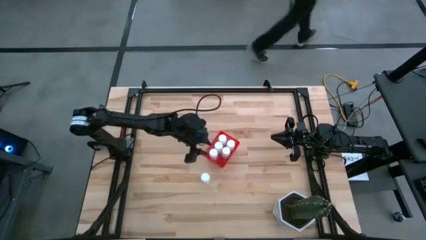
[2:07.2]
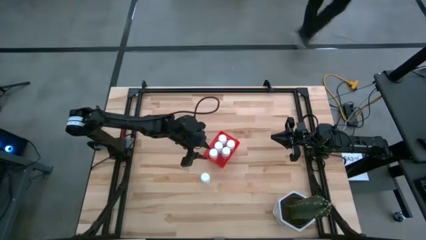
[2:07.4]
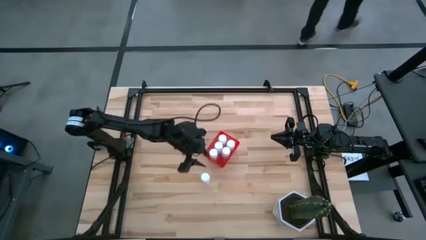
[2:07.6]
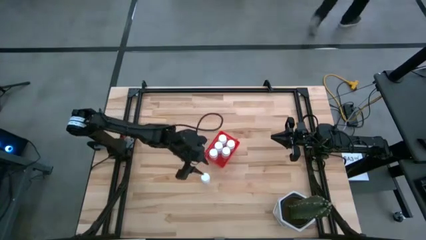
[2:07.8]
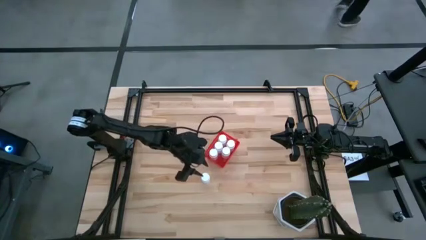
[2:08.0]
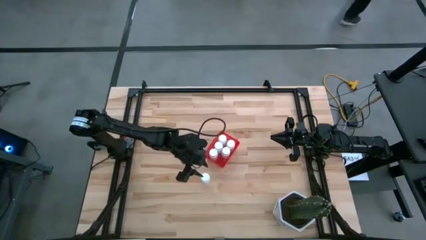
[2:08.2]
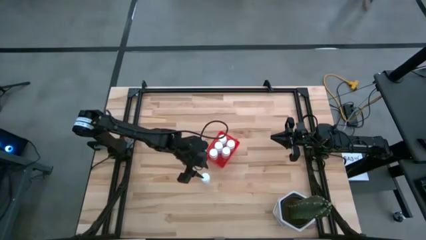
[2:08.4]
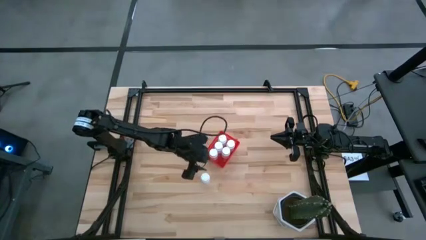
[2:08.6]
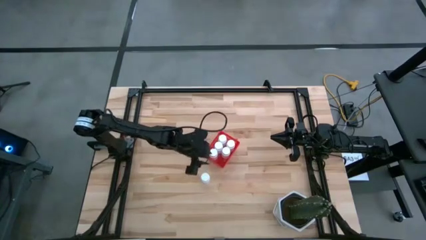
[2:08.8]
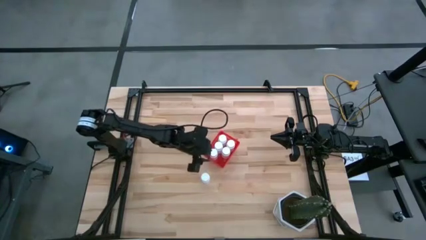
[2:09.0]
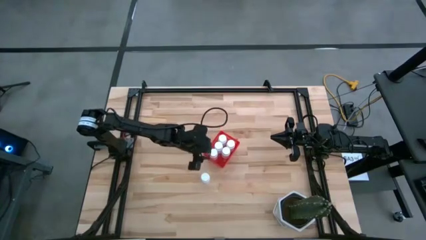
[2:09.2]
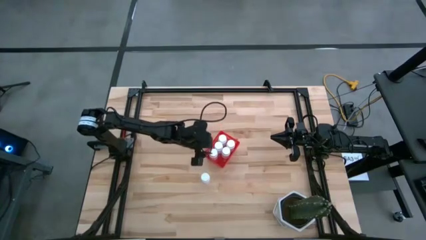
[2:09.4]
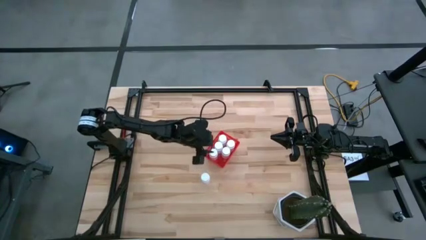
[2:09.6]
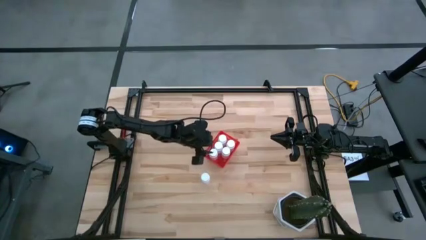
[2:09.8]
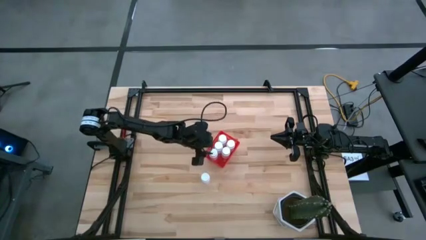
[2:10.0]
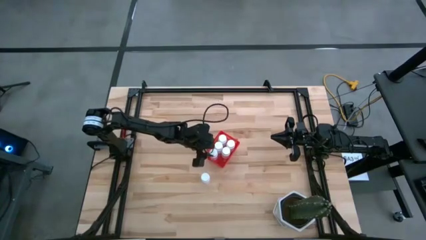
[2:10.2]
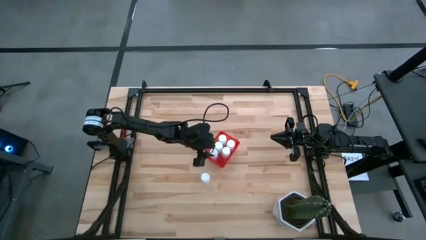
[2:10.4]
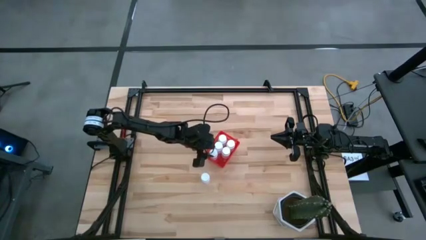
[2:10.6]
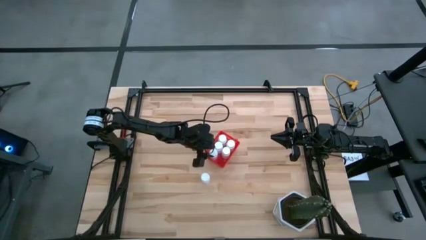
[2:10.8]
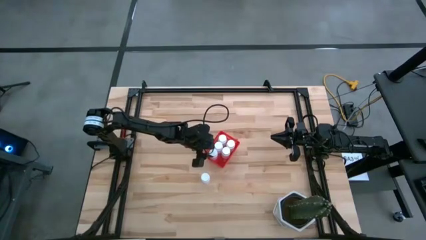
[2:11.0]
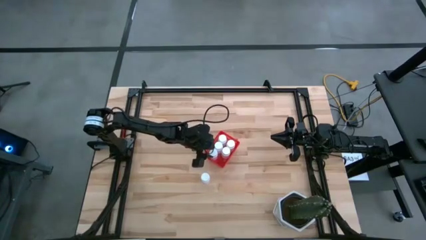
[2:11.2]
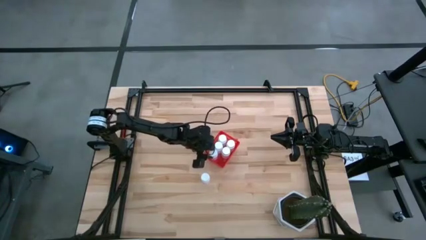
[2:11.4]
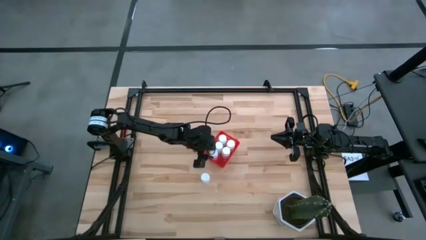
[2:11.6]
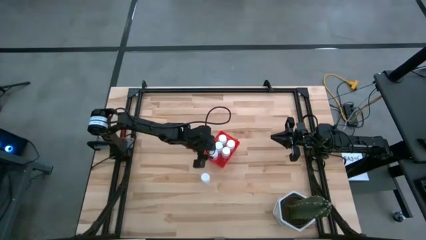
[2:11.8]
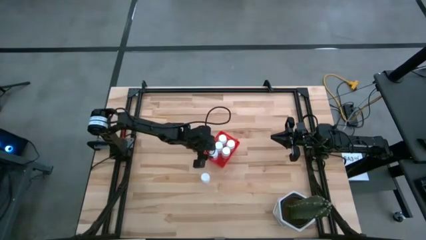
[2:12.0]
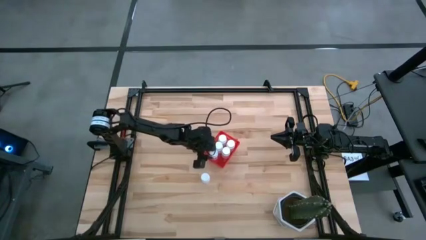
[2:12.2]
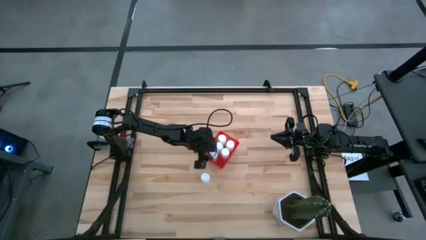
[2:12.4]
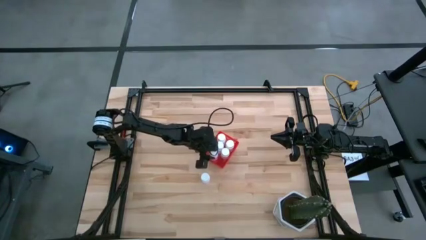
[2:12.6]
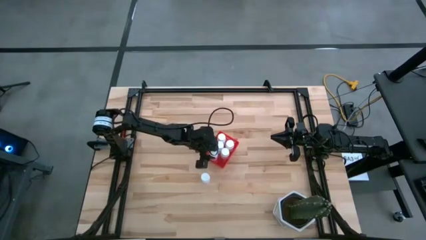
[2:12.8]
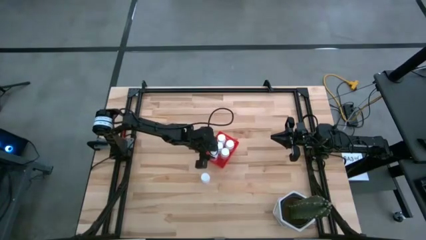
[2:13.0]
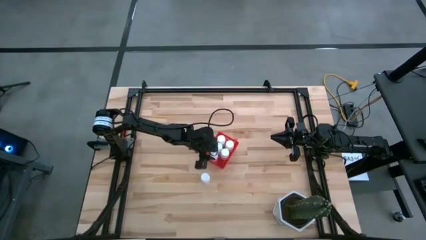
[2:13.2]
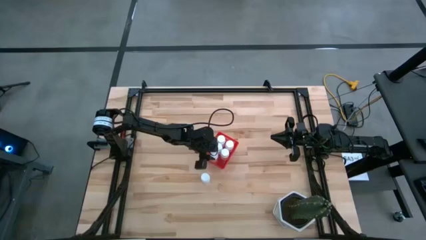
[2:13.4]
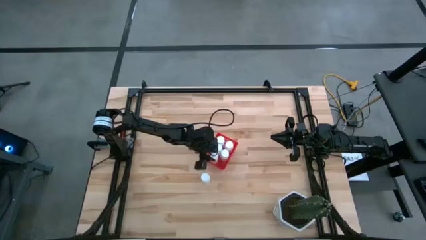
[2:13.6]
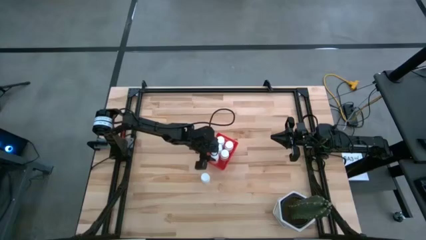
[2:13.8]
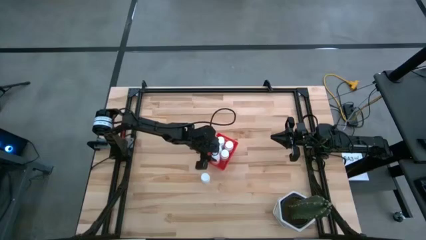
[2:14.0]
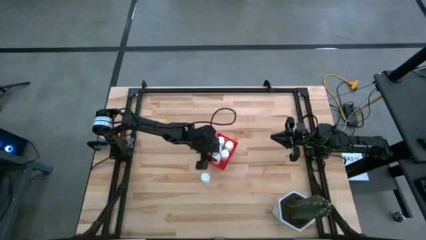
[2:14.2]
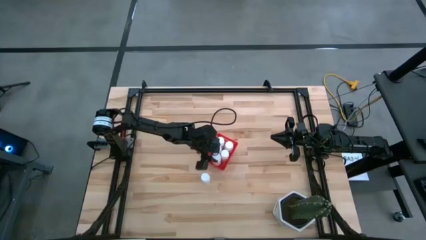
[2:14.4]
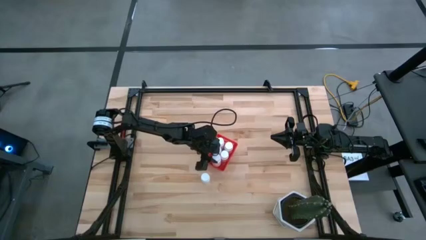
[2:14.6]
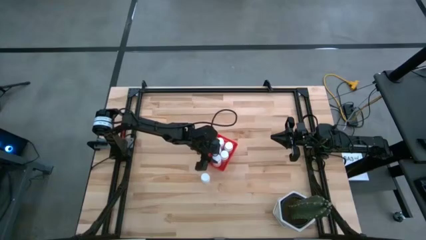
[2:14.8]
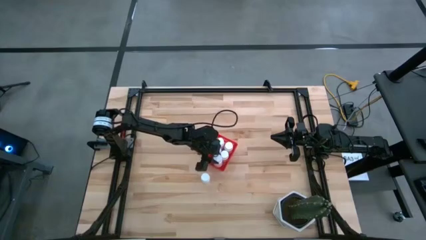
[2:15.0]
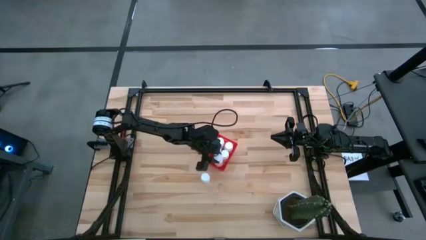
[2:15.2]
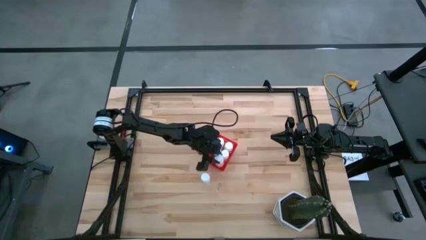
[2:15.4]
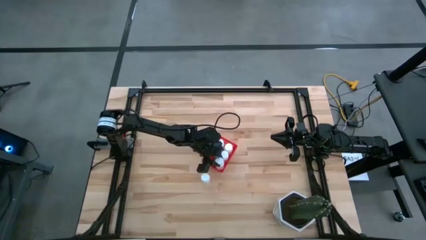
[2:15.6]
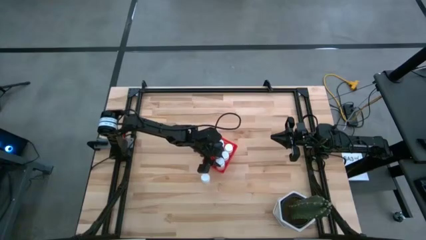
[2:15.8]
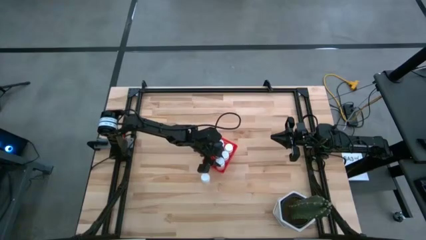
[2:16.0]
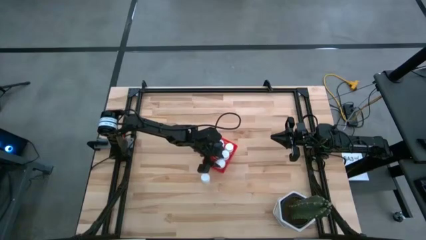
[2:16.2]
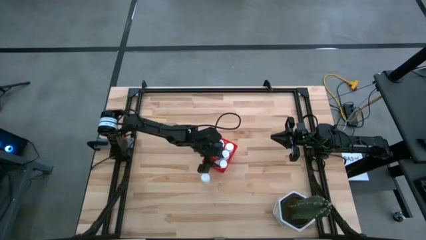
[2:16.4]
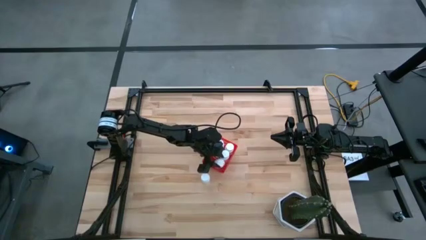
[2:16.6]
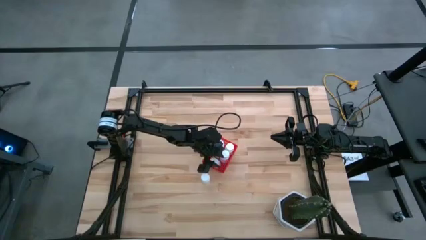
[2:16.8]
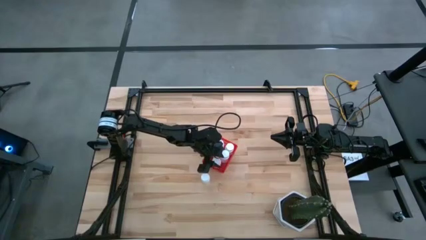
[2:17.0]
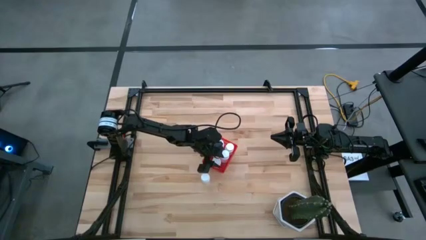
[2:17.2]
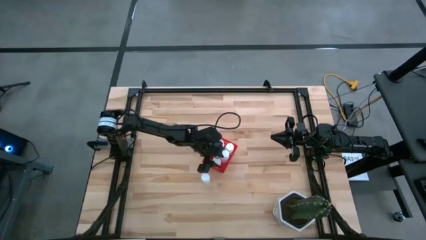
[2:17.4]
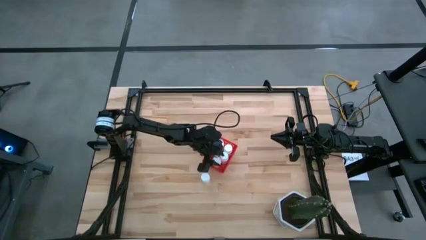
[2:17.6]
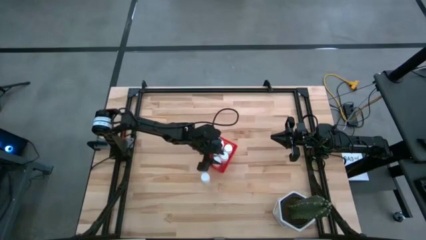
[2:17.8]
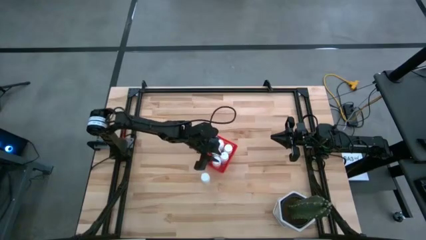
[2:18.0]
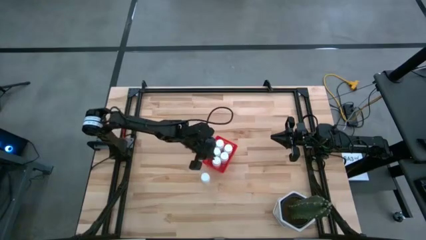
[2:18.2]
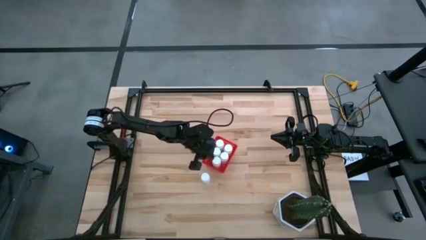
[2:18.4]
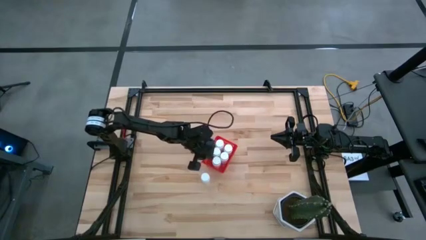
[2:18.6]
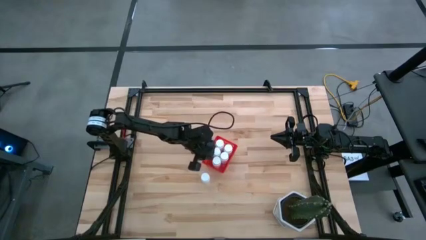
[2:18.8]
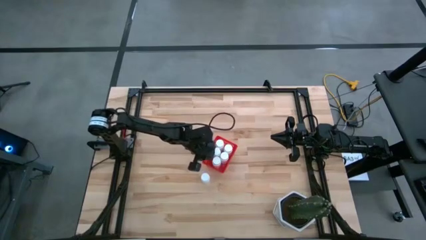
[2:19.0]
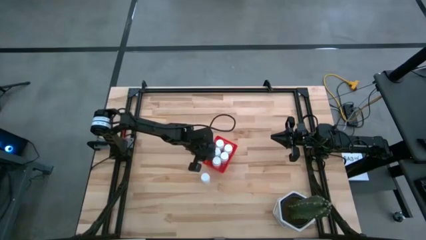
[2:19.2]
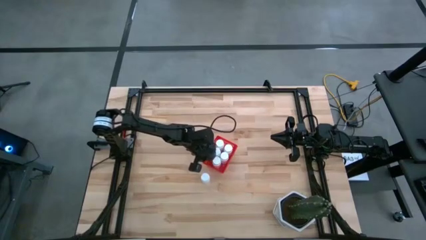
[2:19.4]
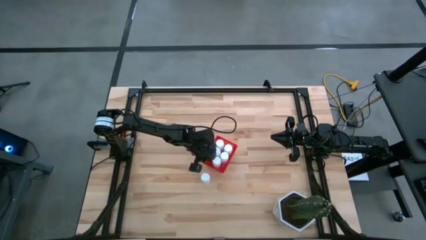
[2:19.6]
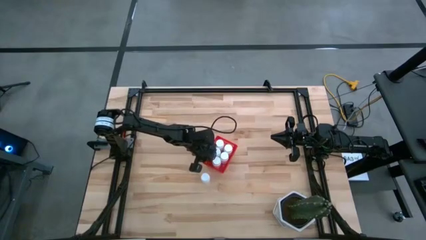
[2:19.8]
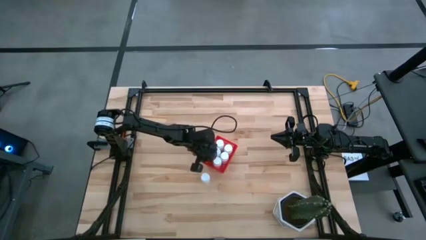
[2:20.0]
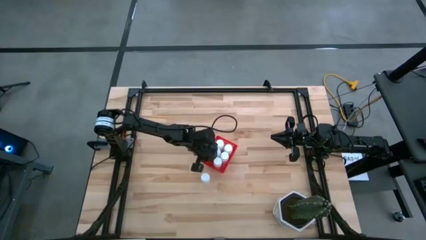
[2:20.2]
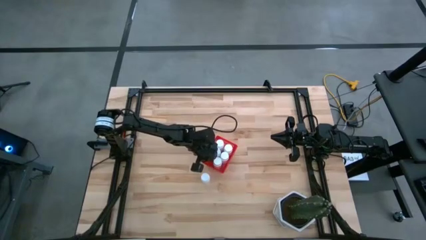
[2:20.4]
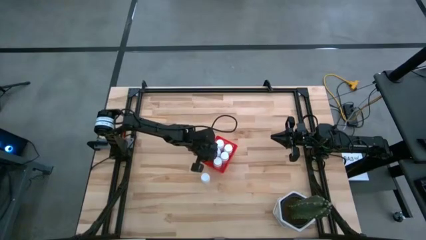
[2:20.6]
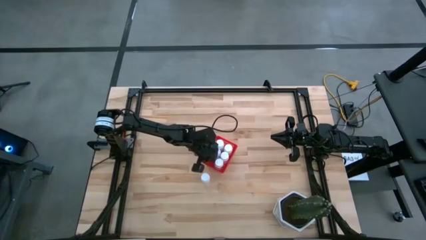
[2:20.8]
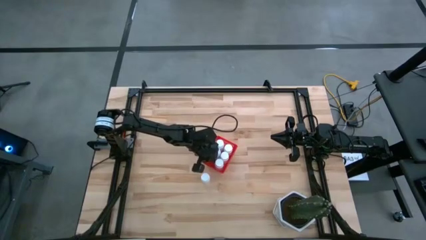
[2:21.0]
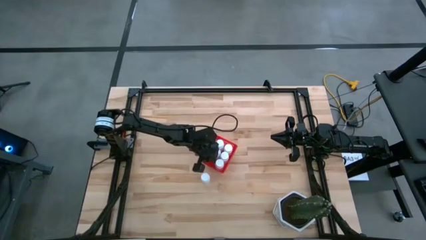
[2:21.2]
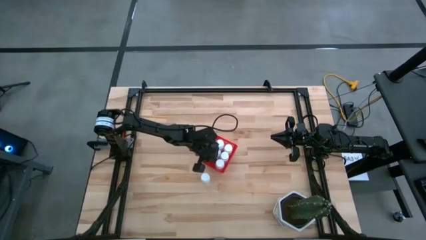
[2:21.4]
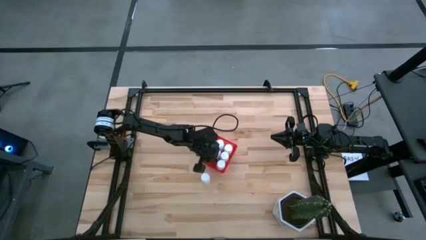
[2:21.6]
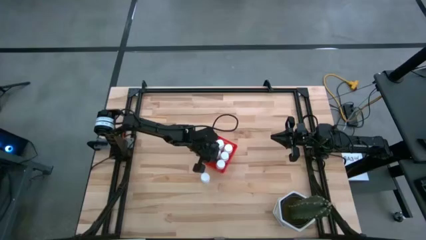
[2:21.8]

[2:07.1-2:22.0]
Task: Pick and place pill bottles into a basket
Put the top white pill bottle into the red basket
